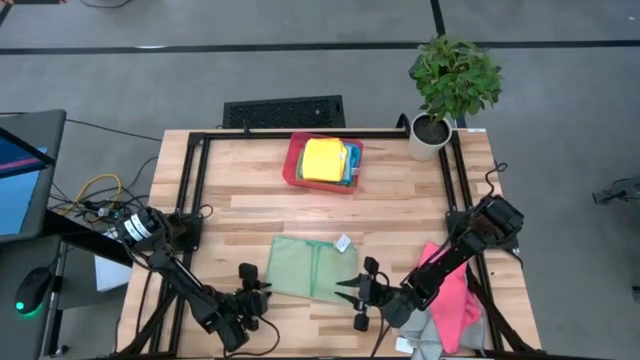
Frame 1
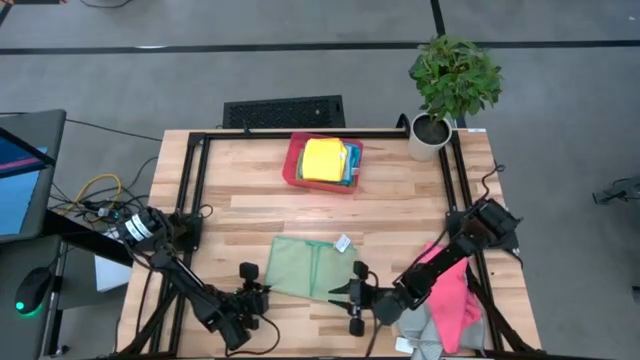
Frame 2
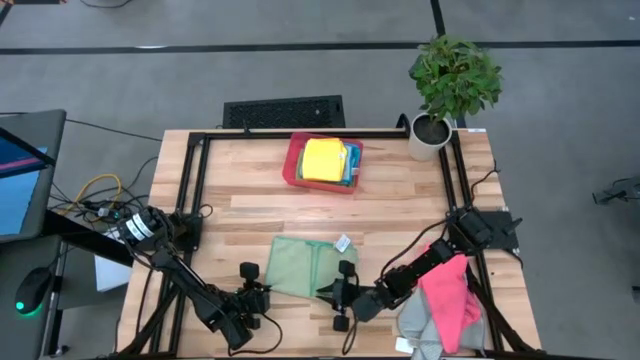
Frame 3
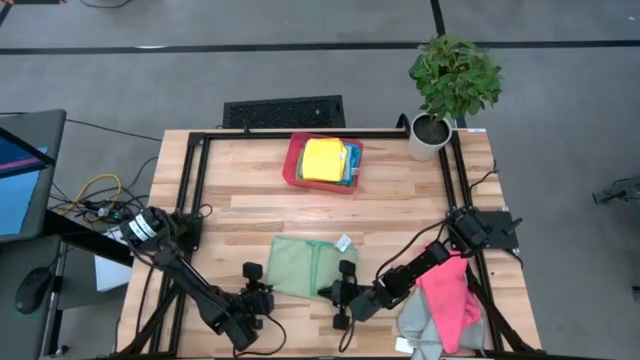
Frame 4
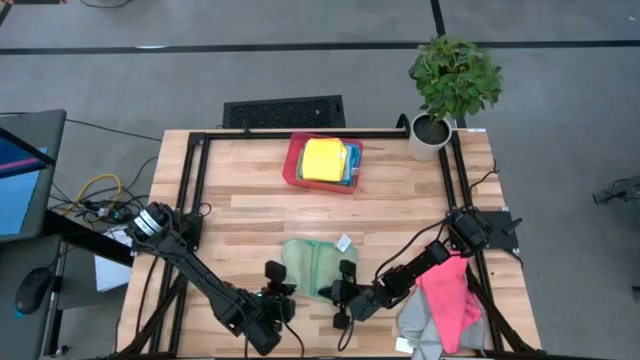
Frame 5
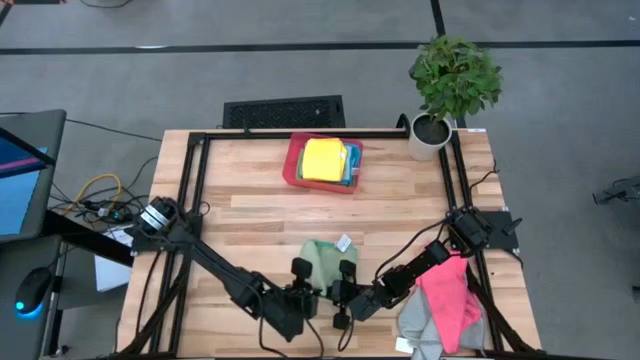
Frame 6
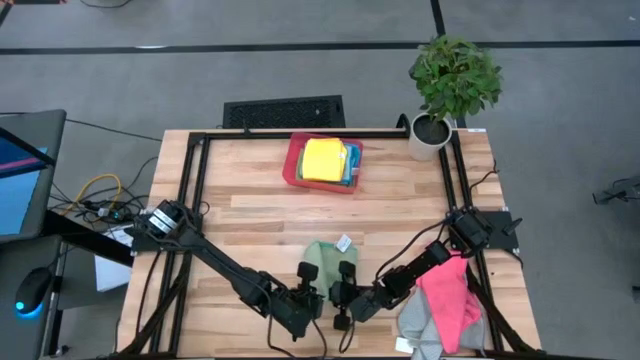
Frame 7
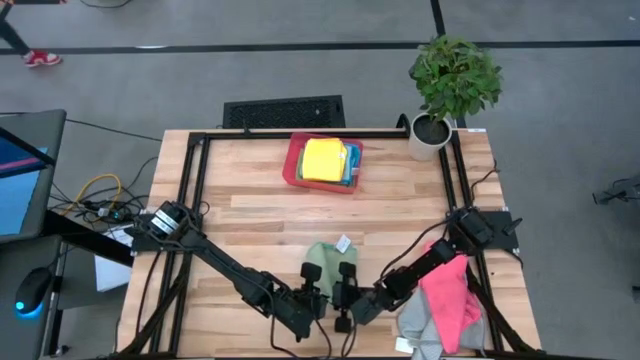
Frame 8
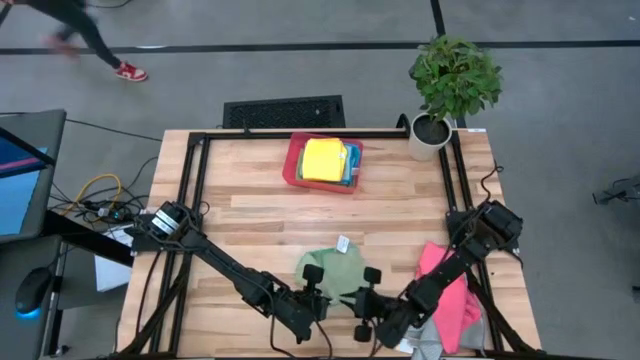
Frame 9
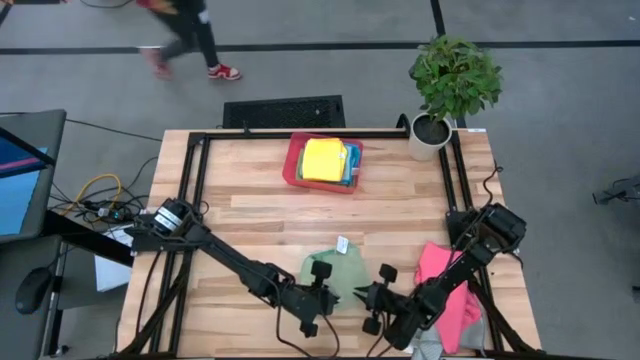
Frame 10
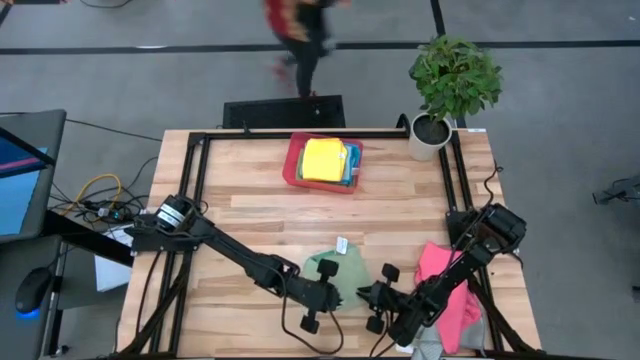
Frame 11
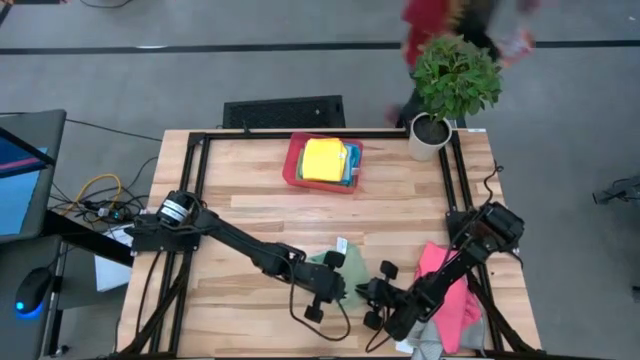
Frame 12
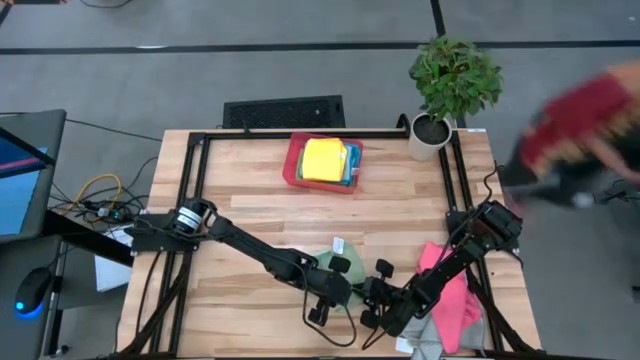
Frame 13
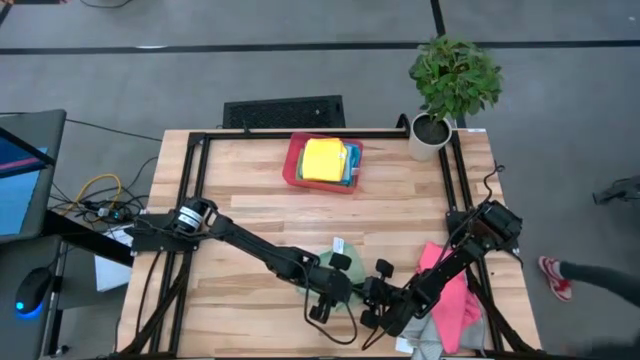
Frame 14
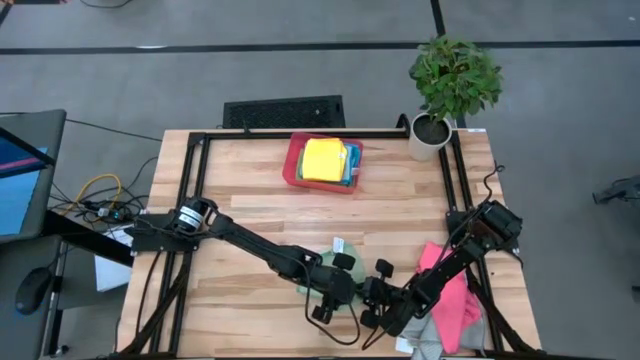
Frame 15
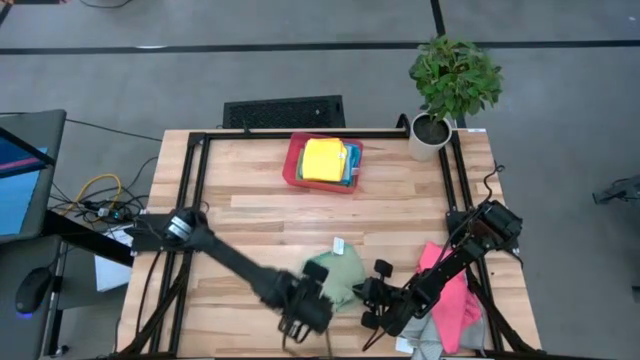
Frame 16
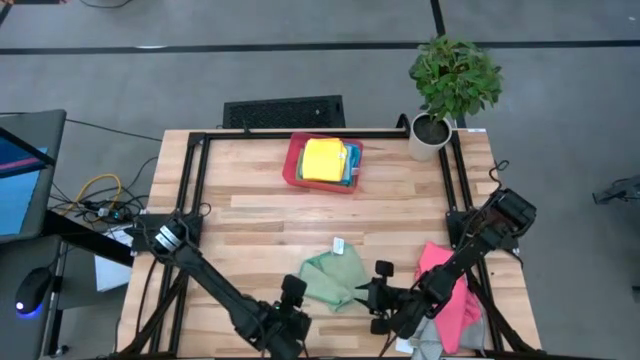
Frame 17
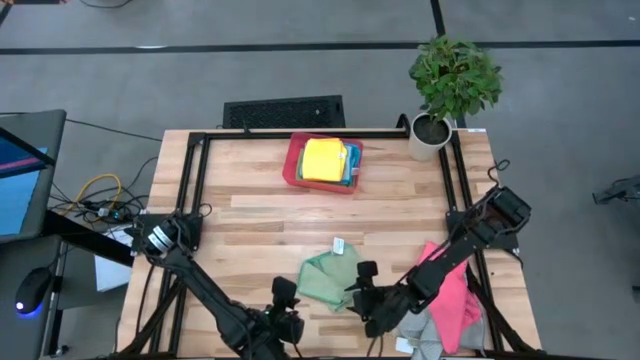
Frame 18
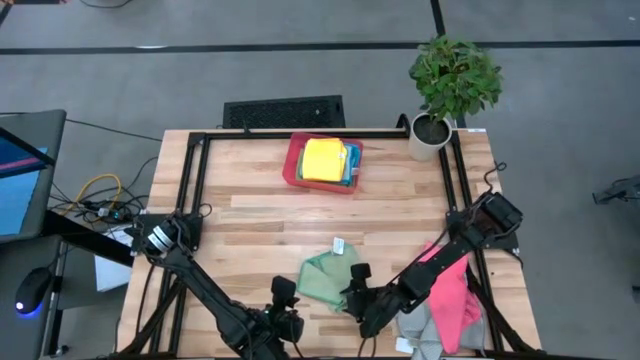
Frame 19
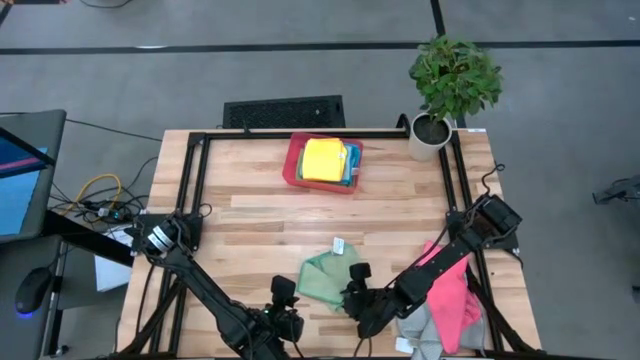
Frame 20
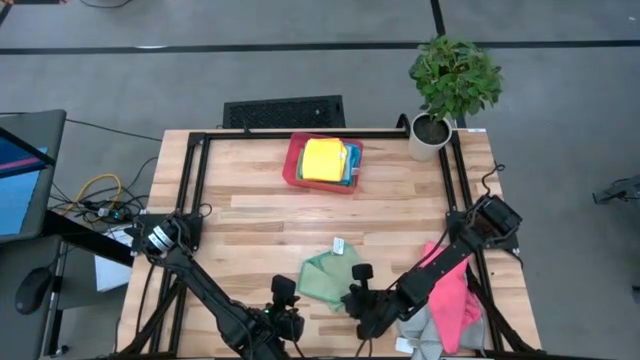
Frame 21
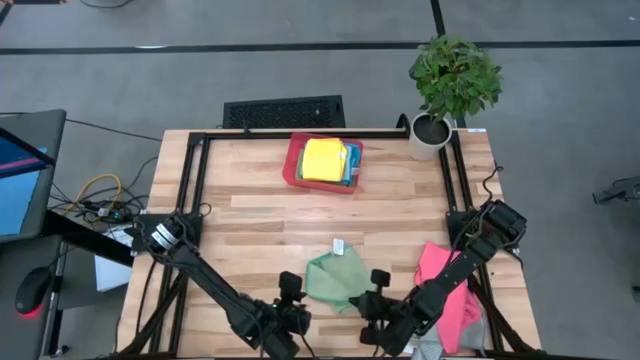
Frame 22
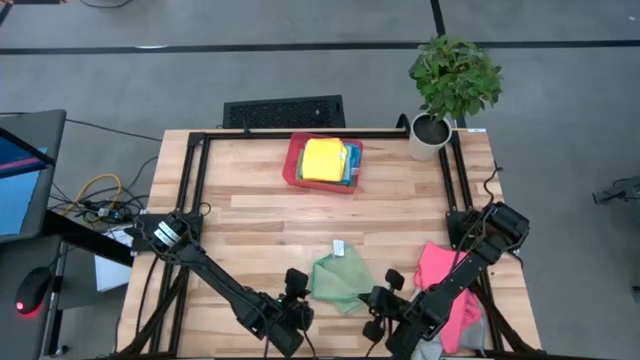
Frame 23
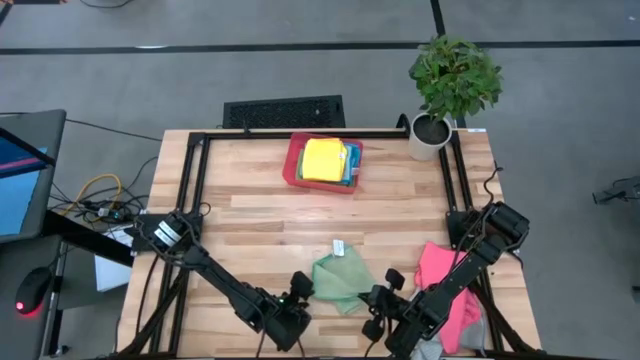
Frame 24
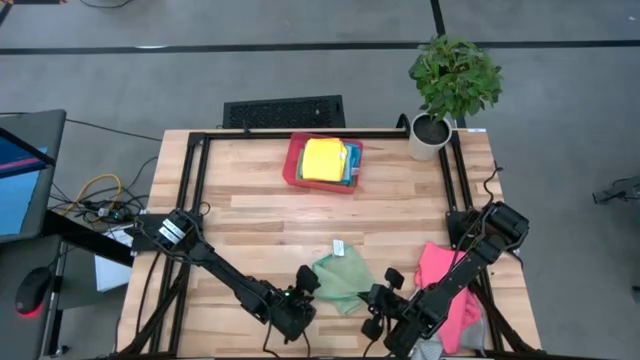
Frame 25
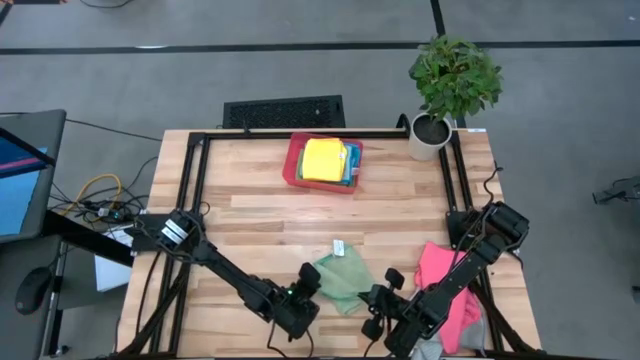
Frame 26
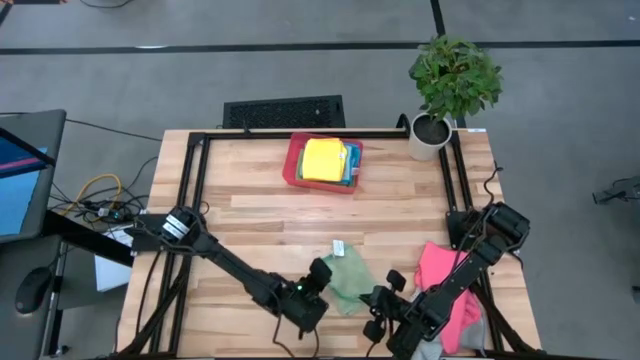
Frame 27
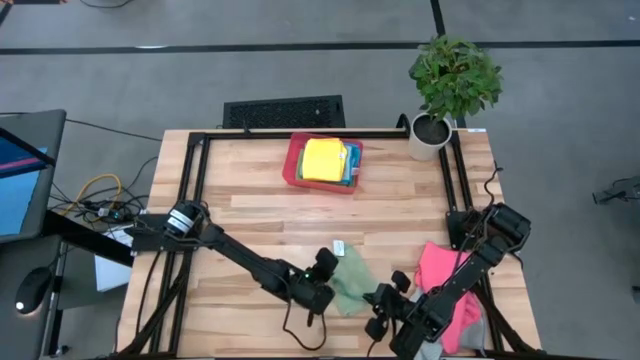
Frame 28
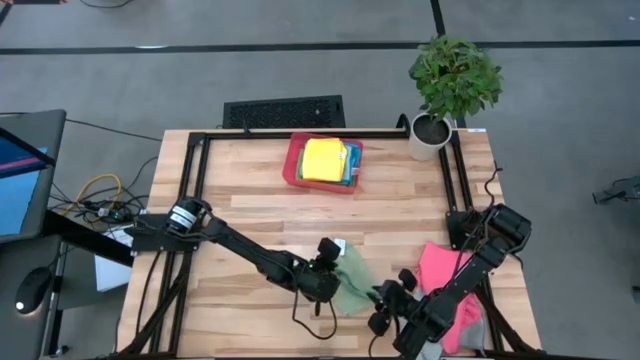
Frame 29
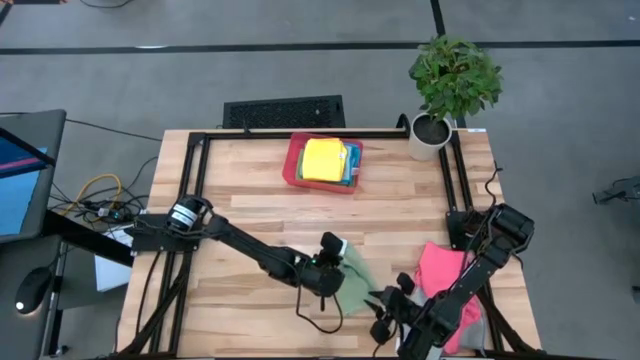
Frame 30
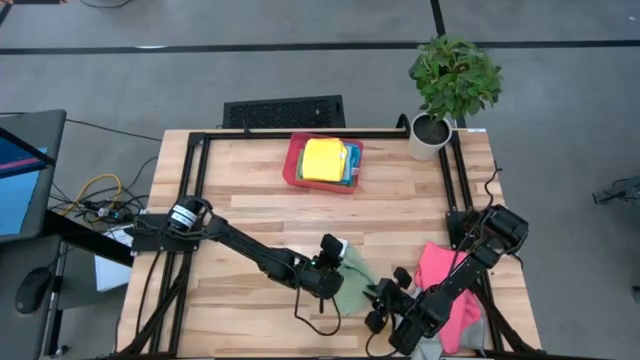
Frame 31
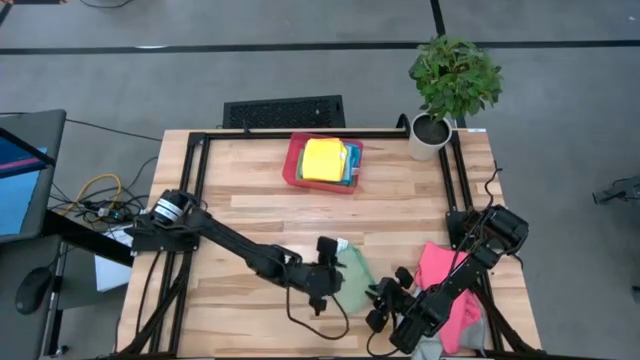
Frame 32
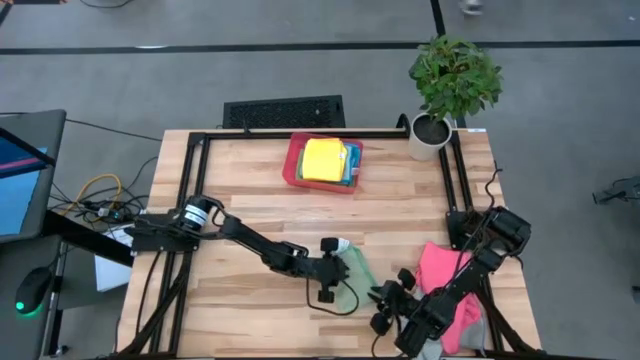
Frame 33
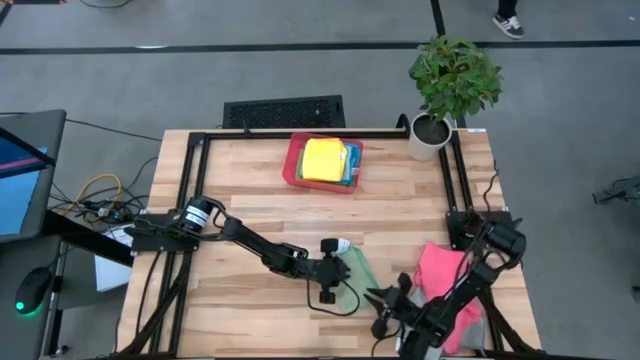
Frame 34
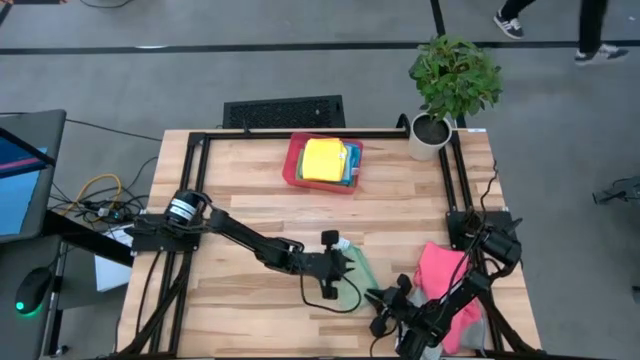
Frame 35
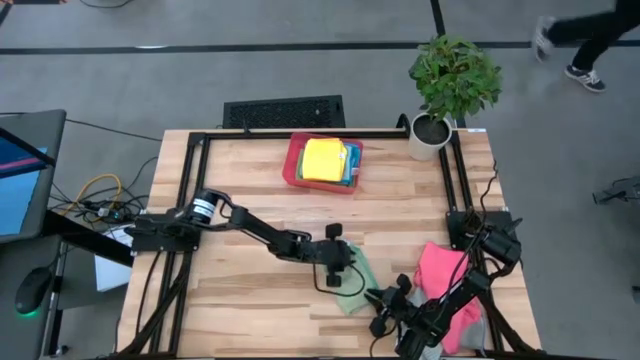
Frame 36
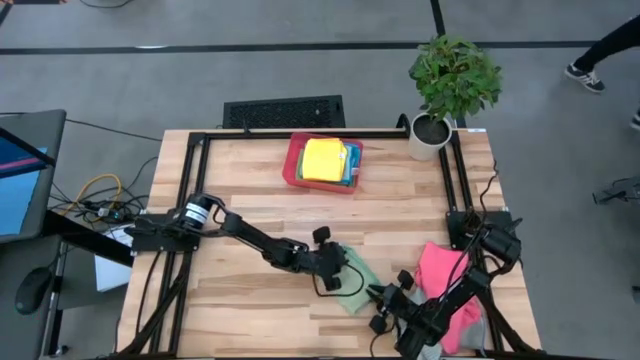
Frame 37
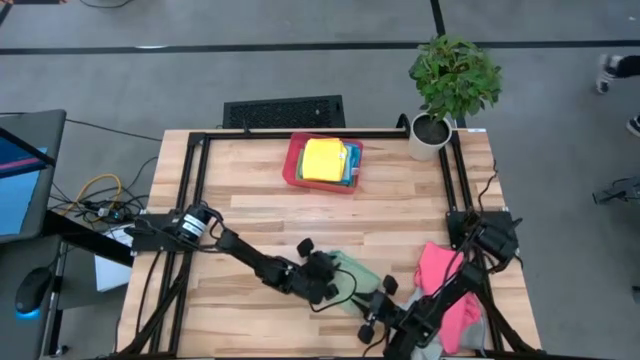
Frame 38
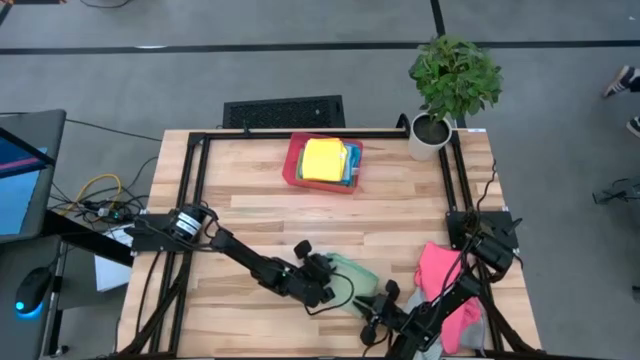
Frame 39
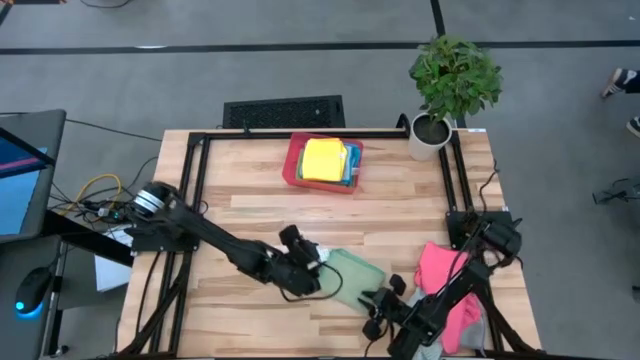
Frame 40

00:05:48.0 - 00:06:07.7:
Task: Fold microfiber towels
Fold the green microfiber cloth

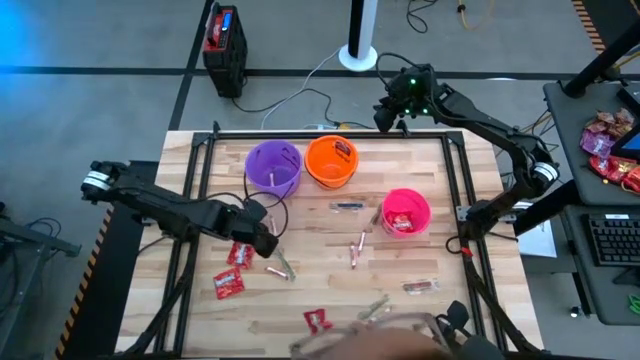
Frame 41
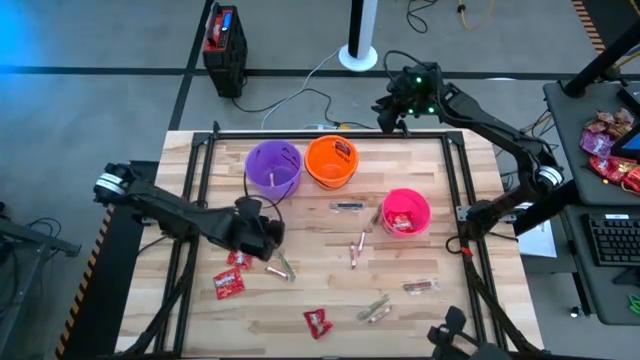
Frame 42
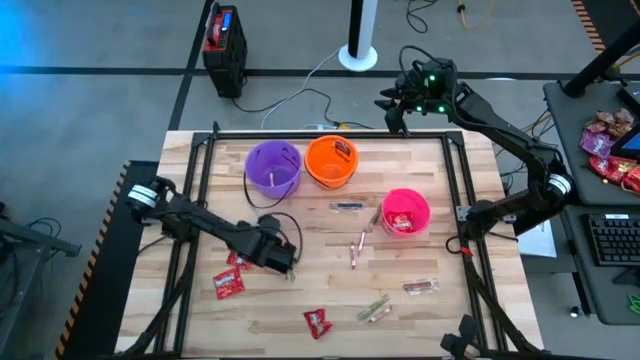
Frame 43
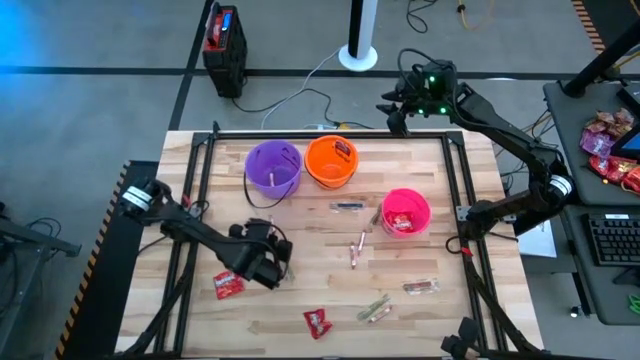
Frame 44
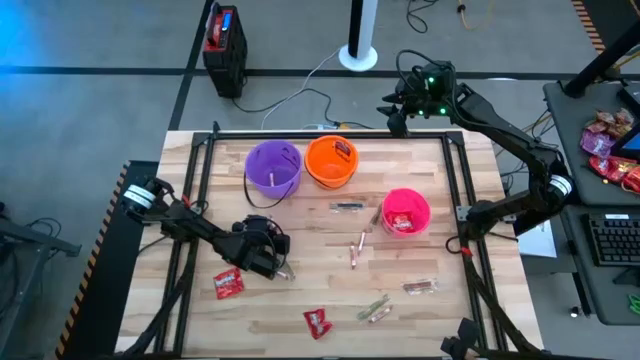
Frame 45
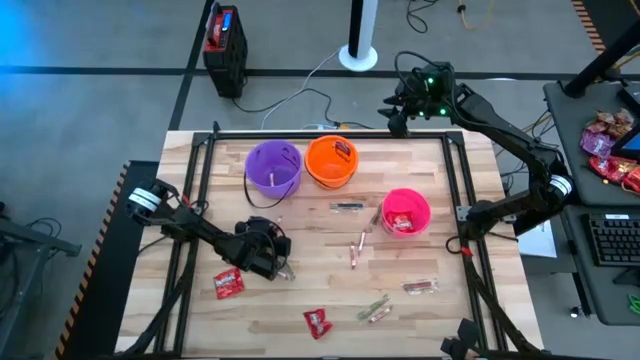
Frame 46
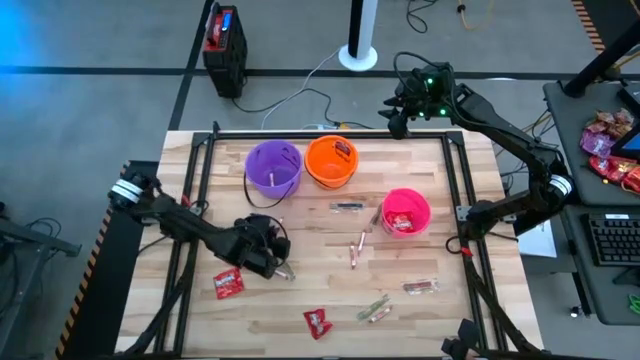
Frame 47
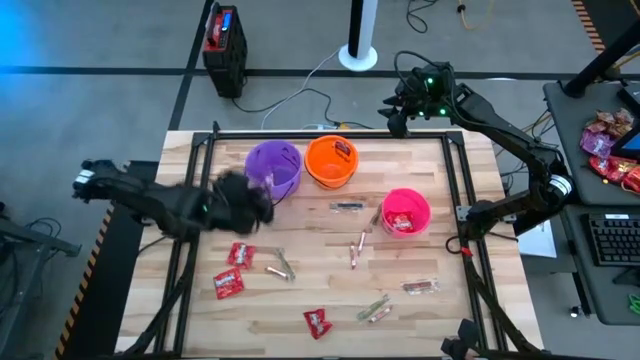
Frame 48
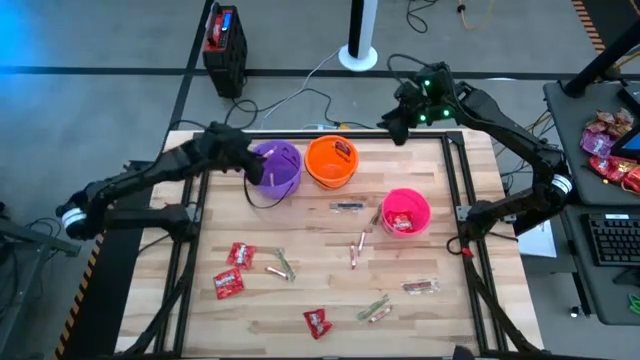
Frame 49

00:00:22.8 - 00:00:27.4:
Task: Sort candy by brand, put in halloween buckets
Put the white candy into the violet bucket
